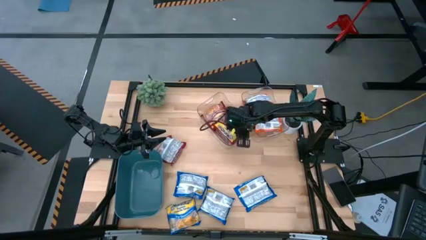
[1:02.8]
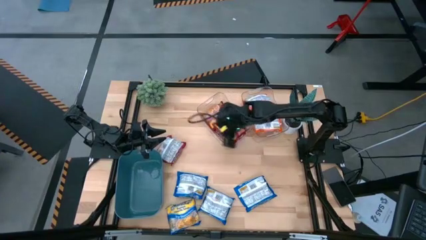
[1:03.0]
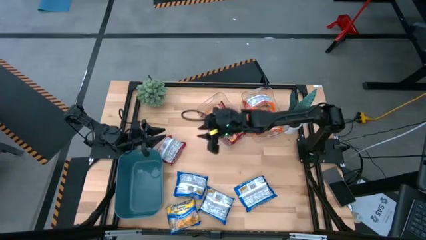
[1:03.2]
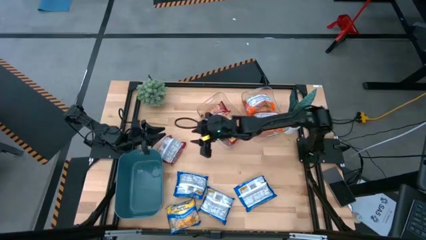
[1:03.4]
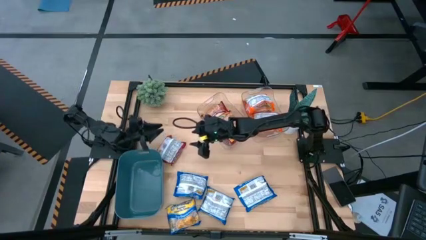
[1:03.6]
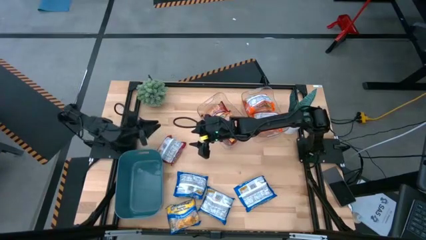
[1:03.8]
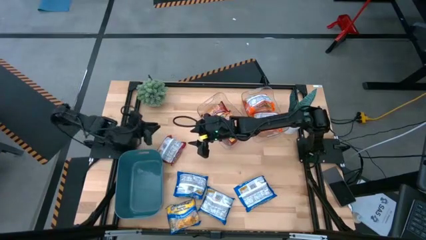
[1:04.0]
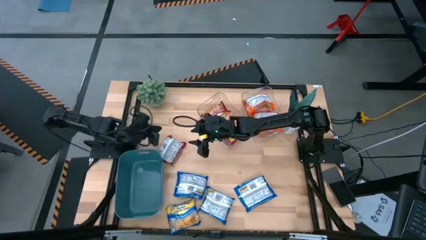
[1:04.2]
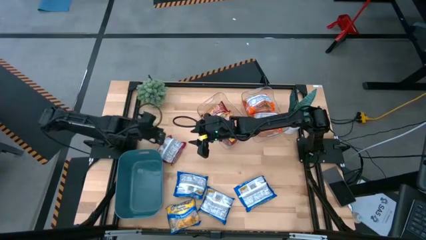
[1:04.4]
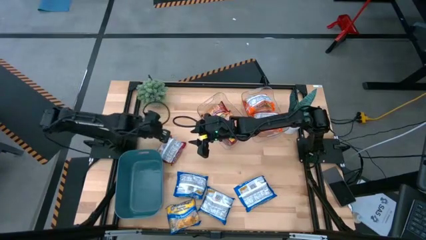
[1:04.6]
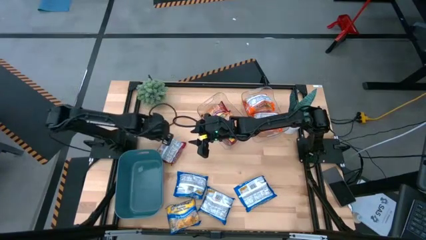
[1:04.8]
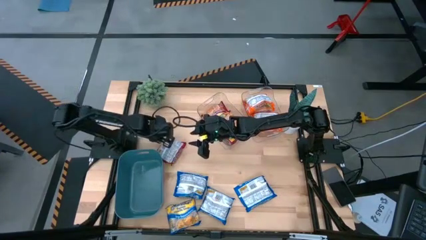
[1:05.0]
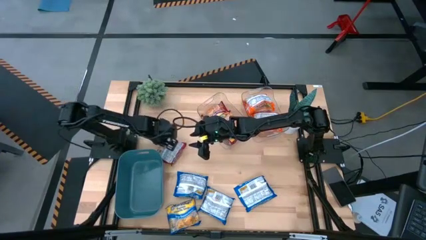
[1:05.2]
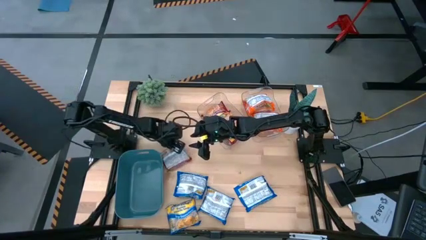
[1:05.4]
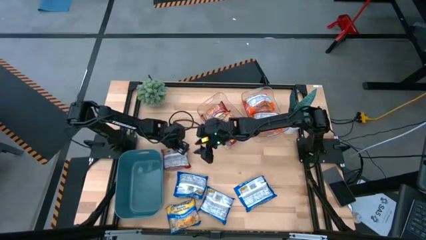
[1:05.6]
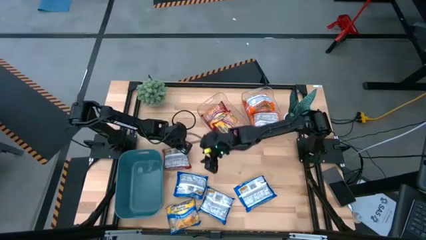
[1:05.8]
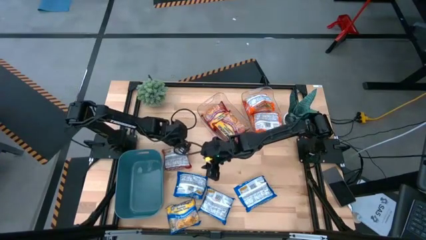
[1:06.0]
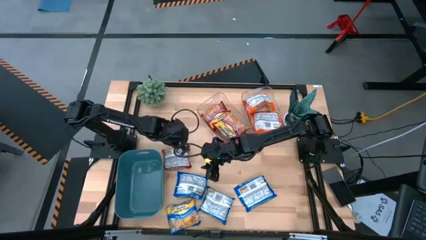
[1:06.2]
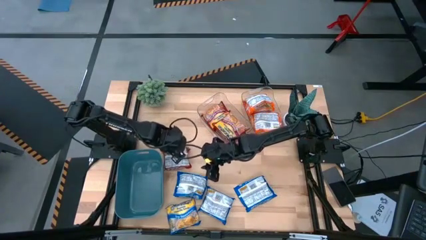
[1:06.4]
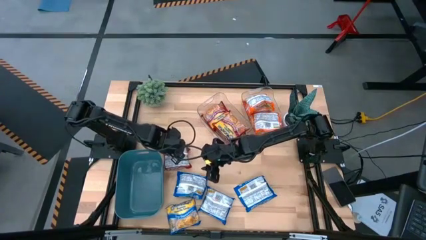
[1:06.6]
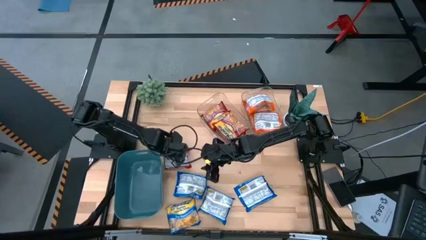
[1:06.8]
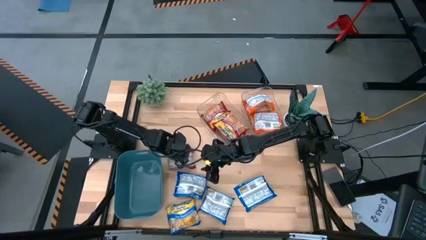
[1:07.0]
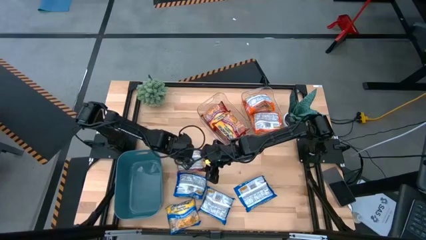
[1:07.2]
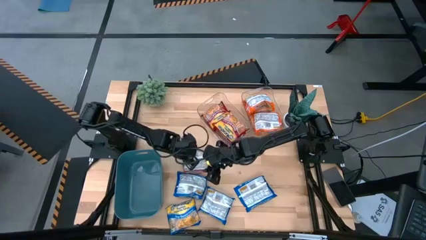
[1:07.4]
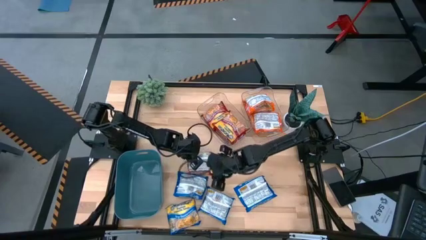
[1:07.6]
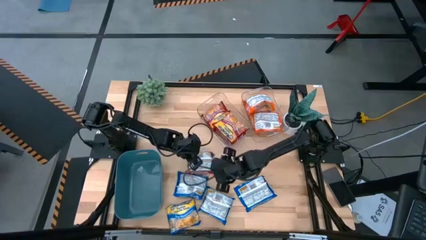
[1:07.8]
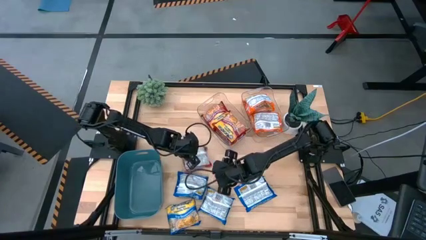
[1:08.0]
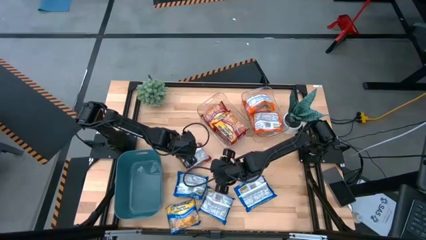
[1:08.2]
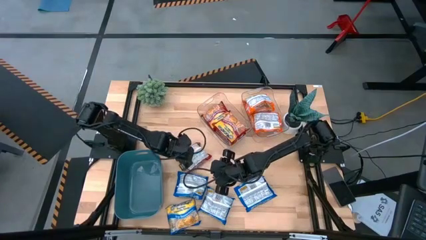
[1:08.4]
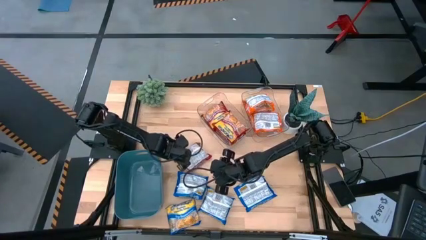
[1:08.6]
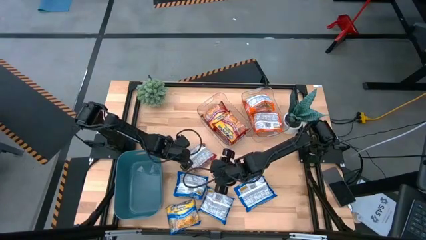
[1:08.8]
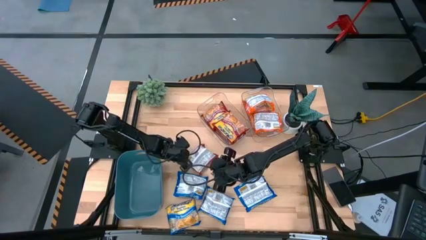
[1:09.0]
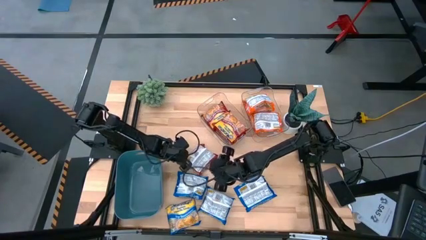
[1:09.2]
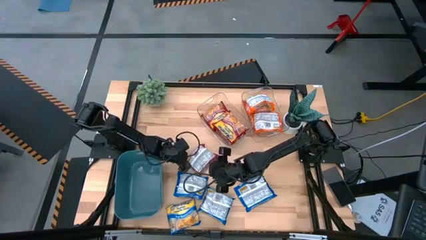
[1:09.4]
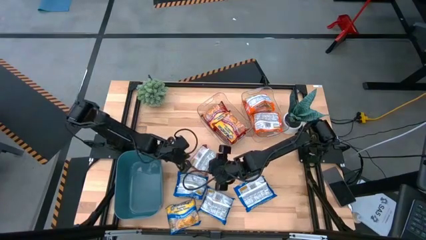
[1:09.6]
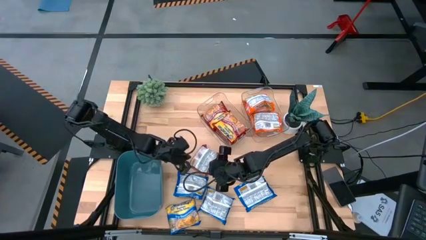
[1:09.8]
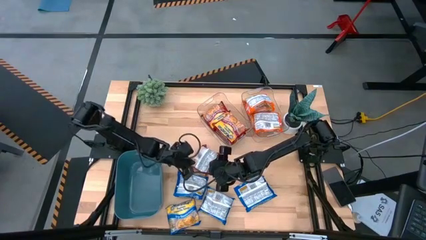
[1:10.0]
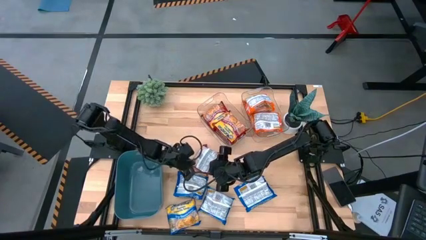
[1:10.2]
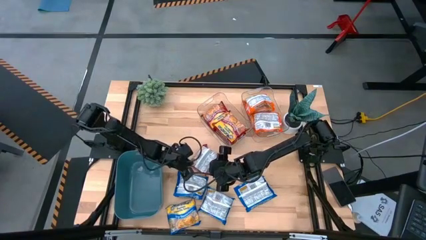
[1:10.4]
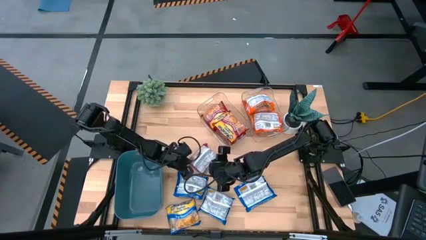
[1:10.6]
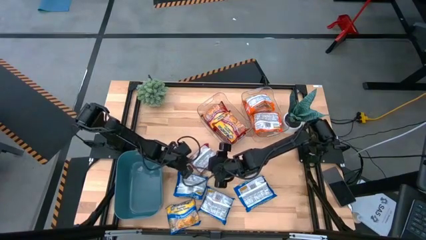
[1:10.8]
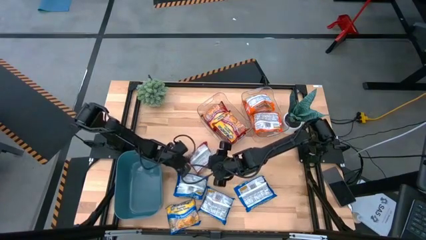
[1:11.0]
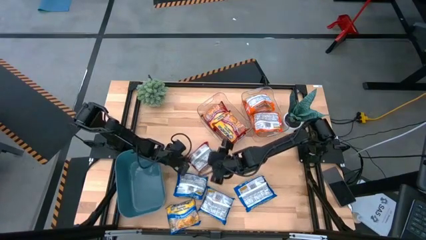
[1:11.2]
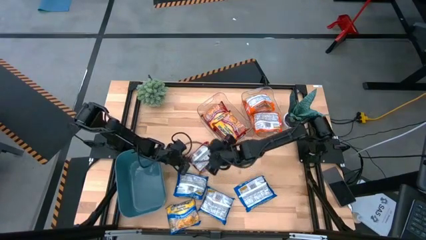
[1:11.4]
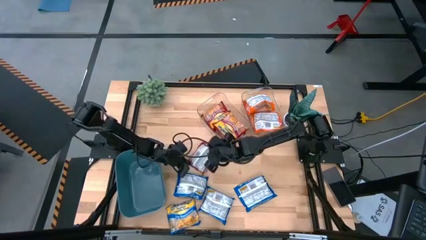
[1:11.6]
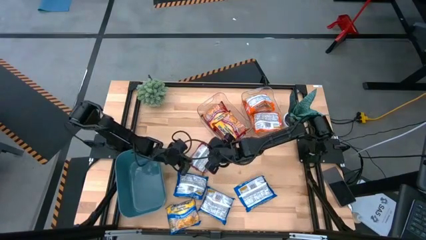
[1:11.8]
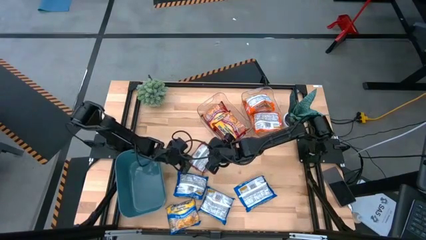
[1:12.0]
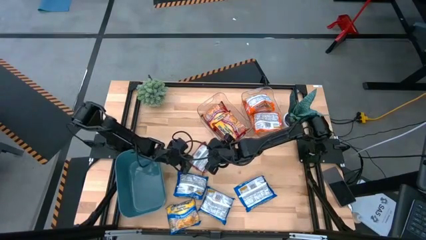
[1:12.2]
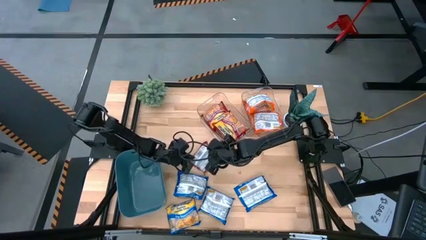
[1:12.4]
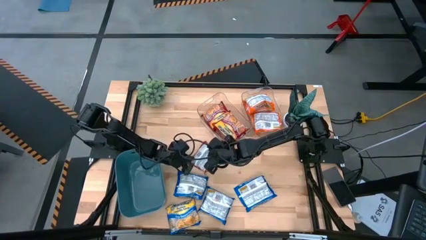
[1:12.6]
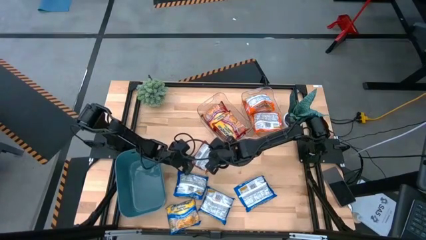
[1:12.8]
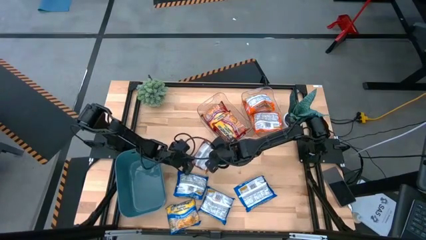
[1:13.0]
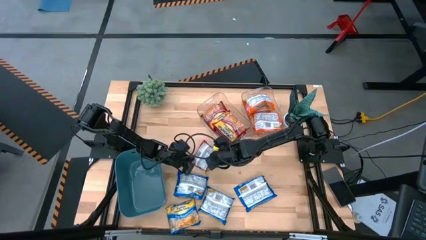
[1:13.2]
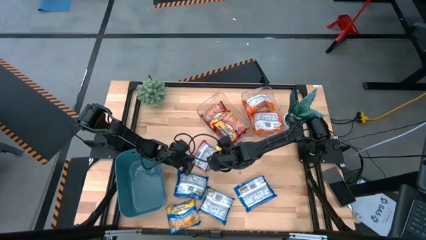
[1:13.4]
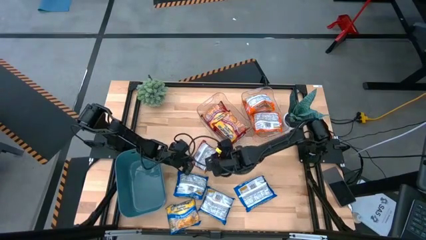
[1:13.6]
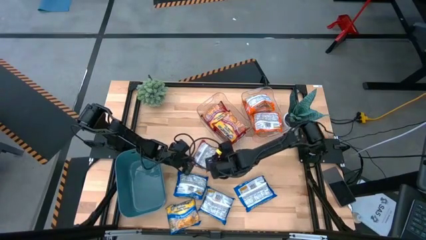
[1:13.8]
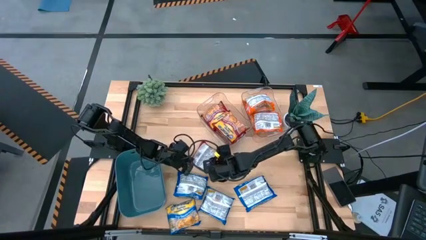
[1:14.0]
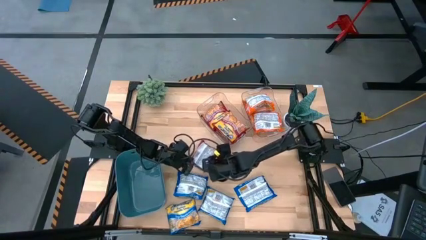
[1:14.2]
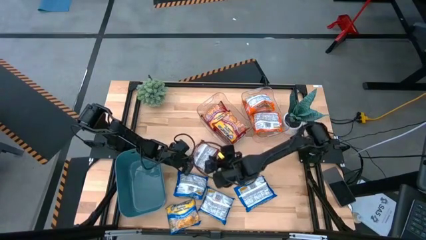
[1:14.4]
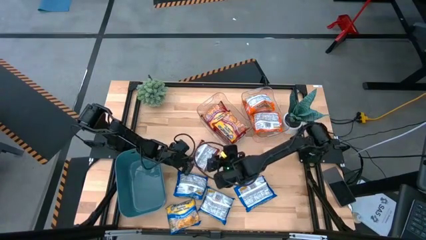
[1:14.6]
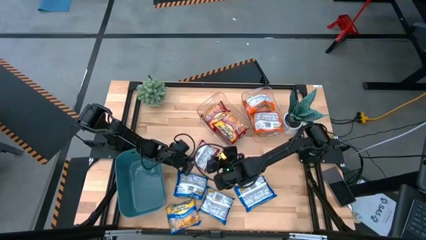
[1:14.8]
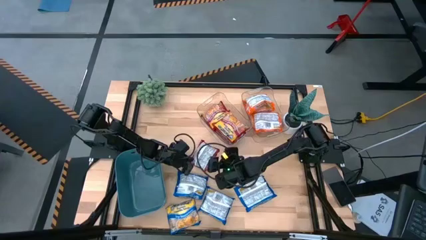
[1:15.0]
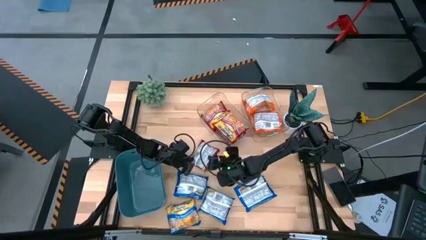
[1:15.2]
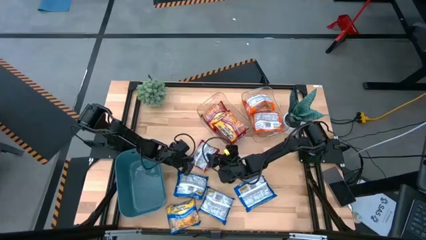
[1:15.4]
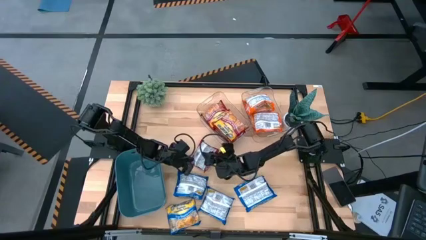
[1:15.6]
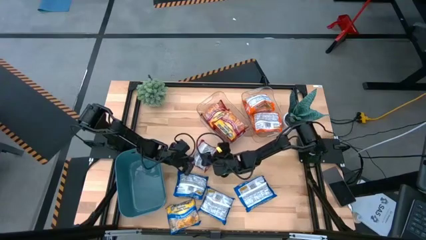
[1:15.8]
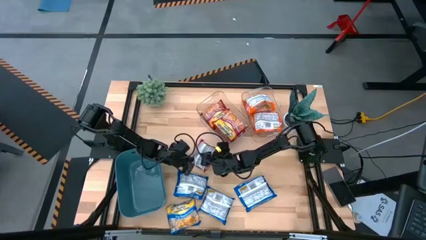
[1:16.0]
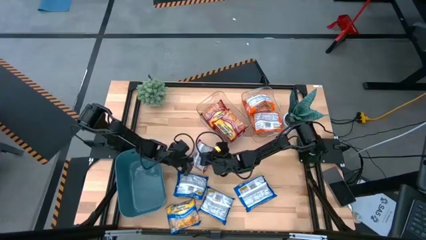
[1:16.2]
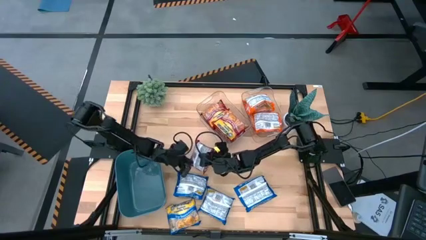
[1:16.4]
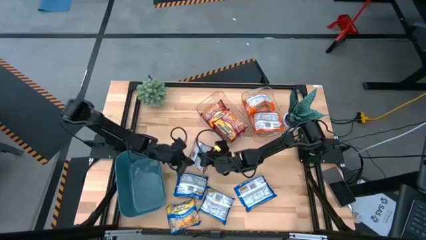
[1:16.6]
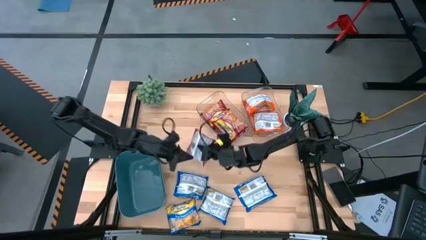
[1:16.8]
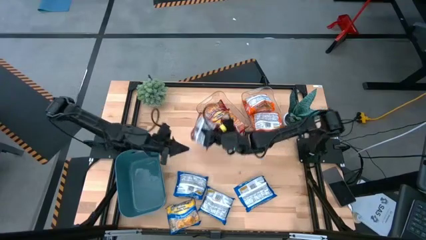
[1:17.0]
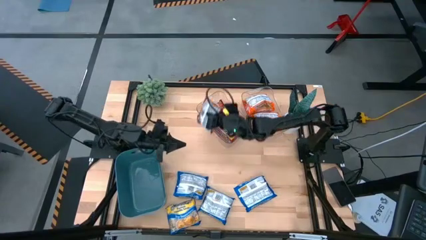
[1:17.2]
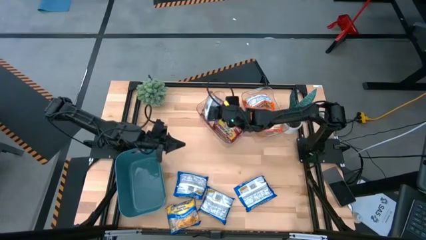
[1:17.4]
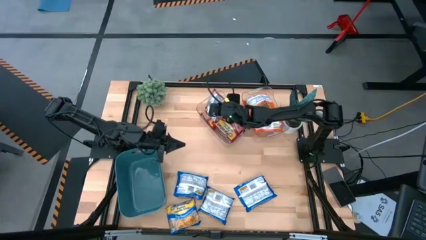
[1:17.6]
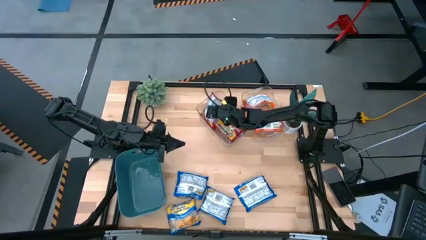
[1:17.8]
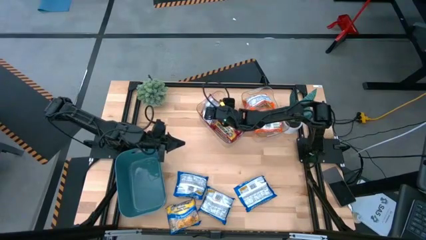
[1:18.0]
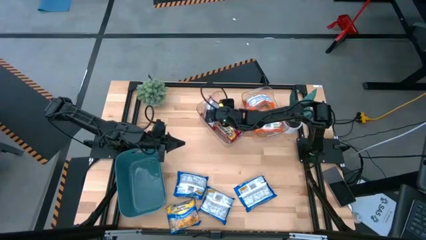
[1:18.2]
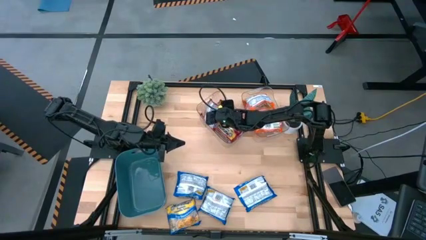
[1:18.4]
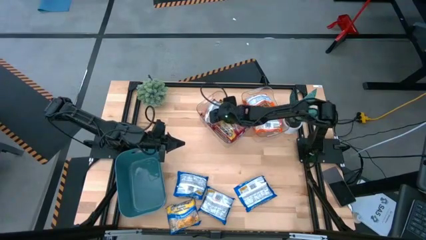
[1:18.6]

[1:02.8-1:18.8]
Task: Sort Maruchan noodles
Put the red noodle pack into the left transparent bin
